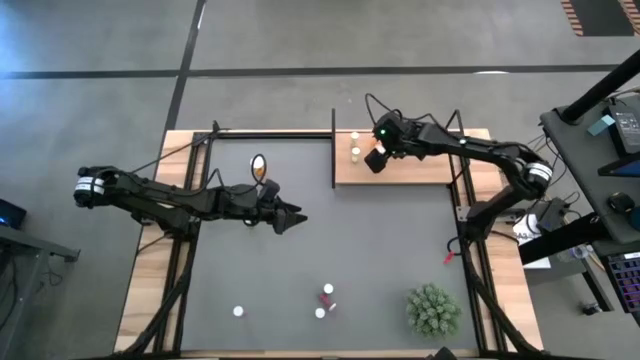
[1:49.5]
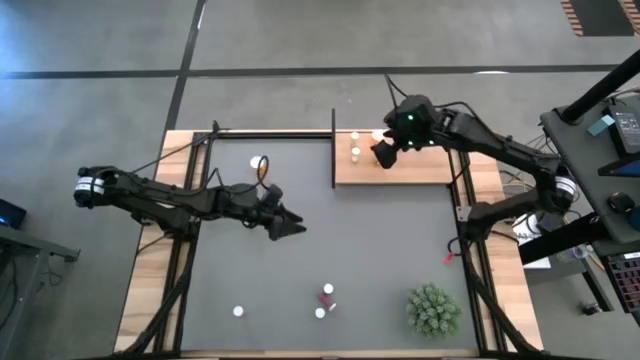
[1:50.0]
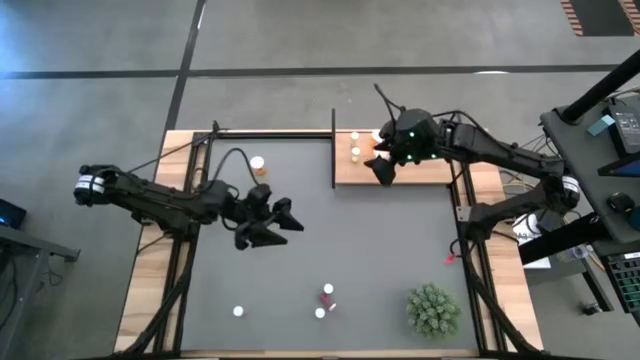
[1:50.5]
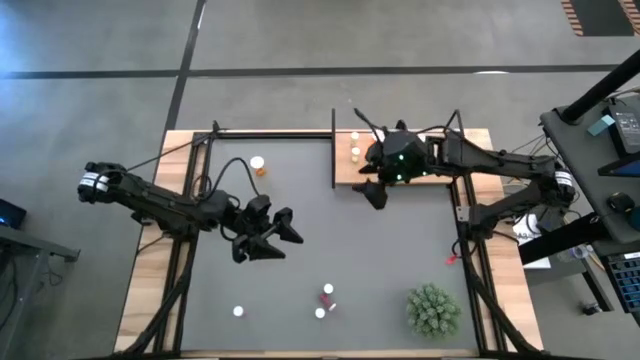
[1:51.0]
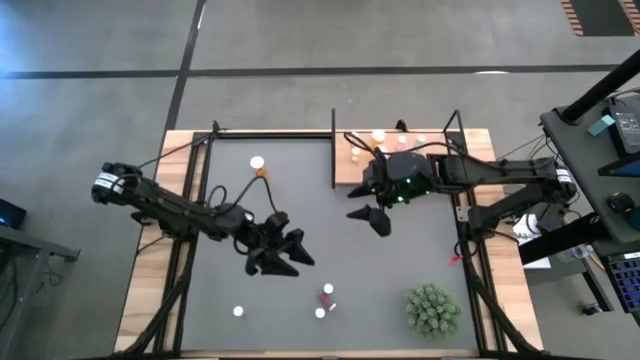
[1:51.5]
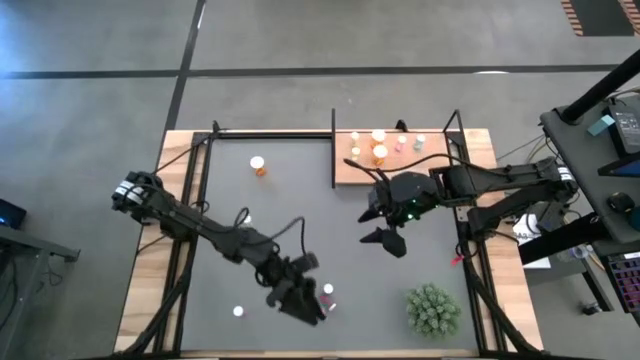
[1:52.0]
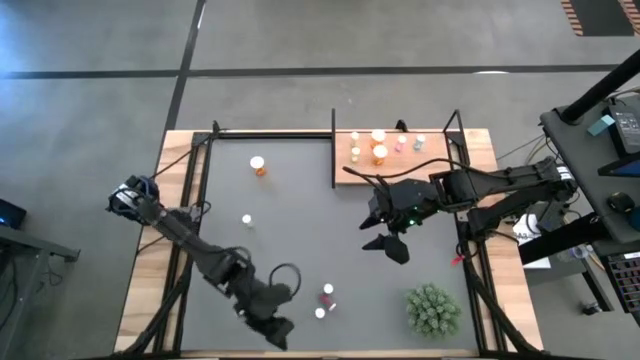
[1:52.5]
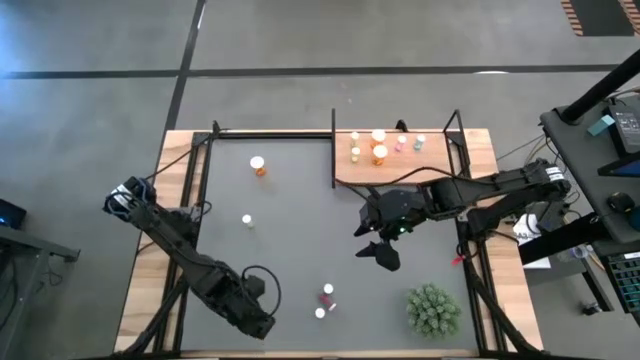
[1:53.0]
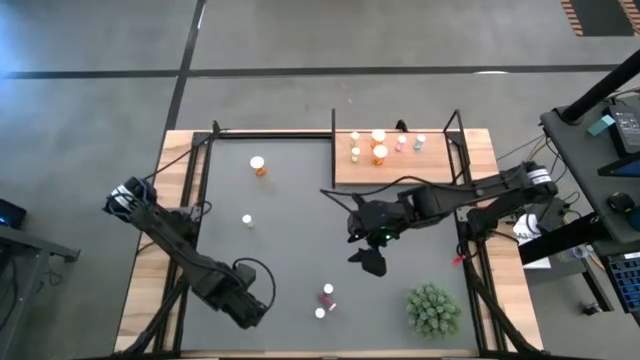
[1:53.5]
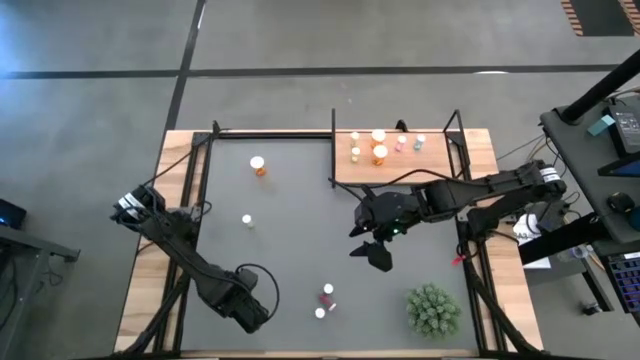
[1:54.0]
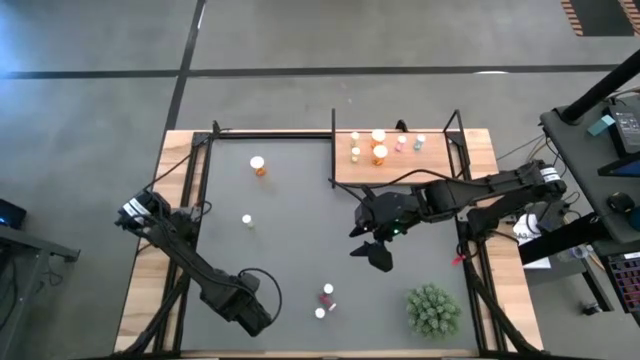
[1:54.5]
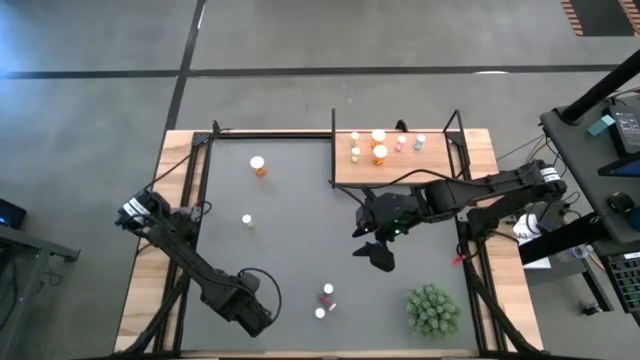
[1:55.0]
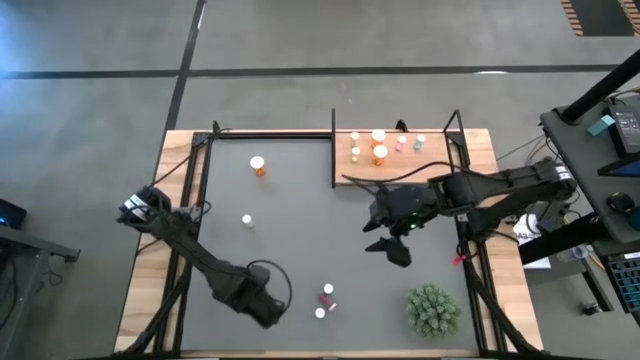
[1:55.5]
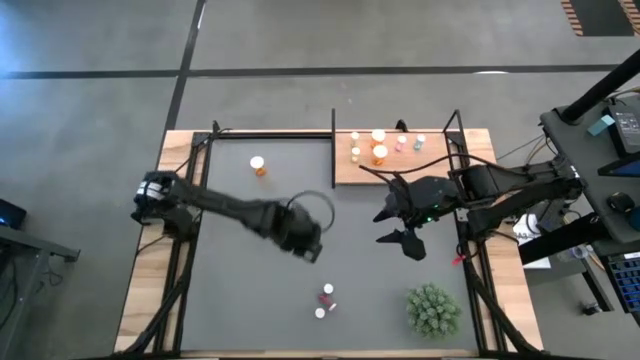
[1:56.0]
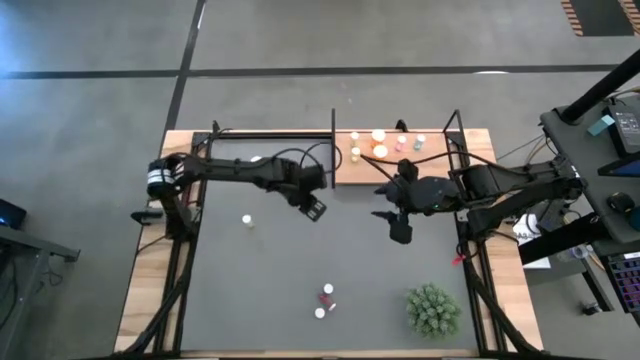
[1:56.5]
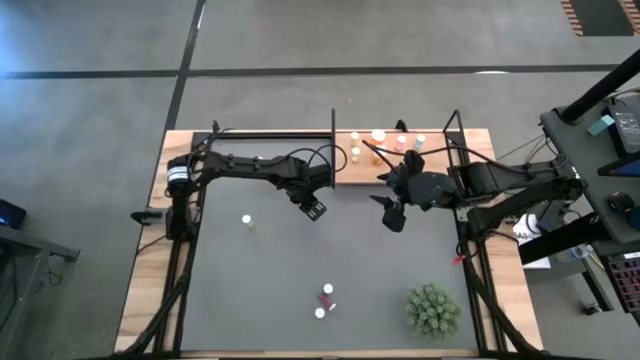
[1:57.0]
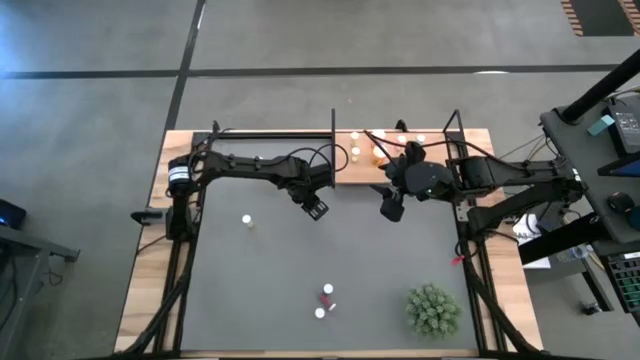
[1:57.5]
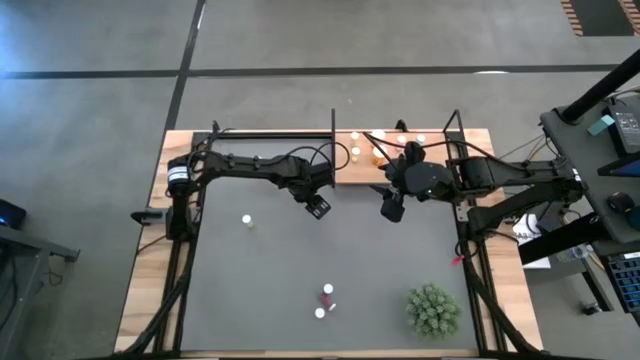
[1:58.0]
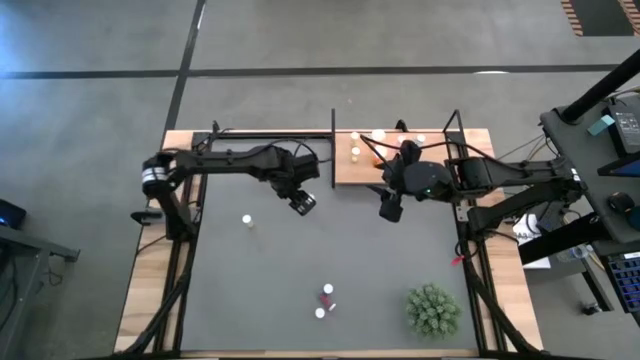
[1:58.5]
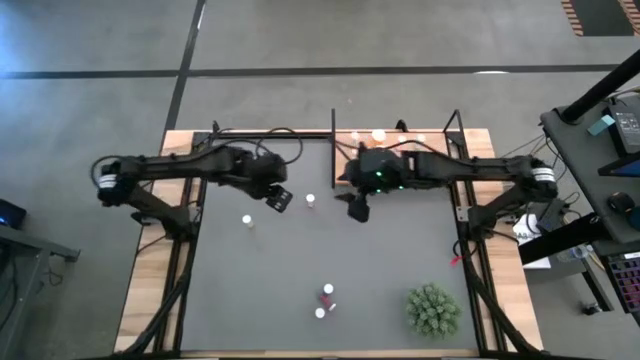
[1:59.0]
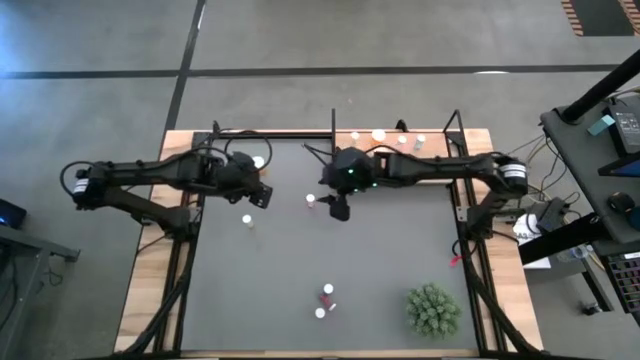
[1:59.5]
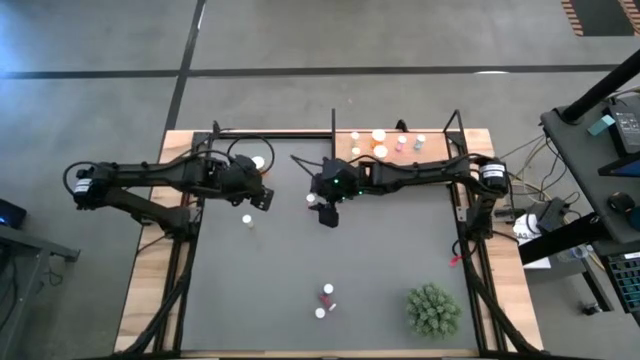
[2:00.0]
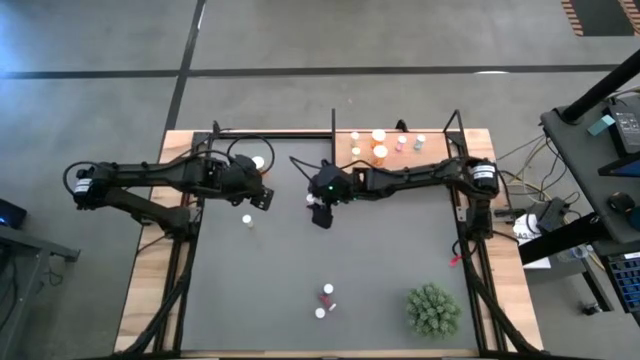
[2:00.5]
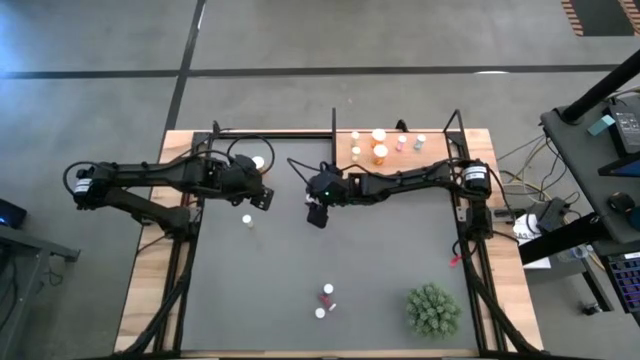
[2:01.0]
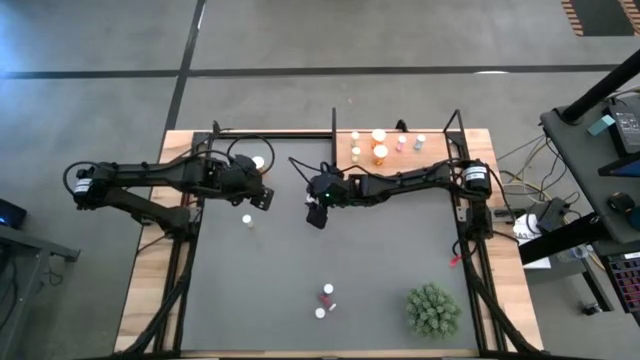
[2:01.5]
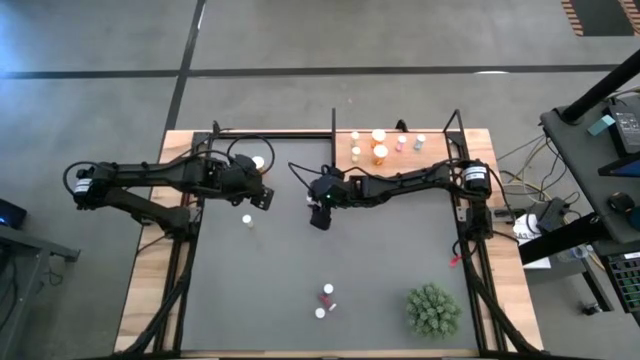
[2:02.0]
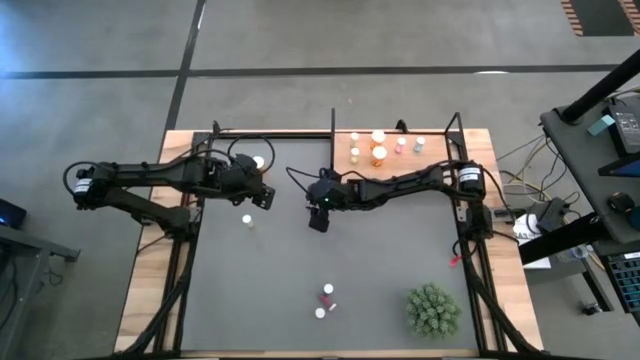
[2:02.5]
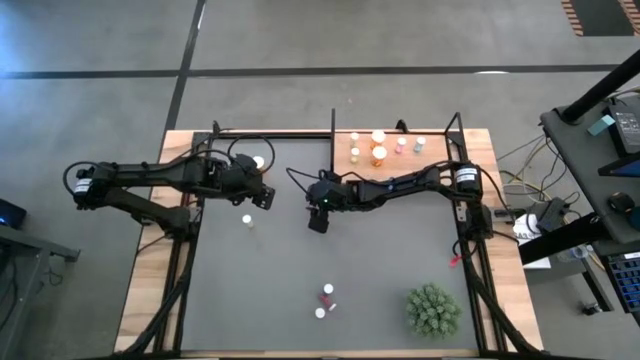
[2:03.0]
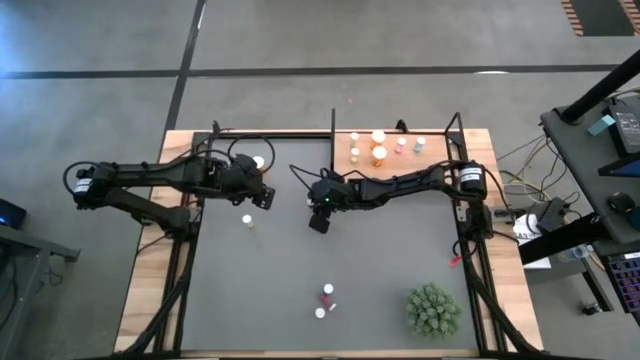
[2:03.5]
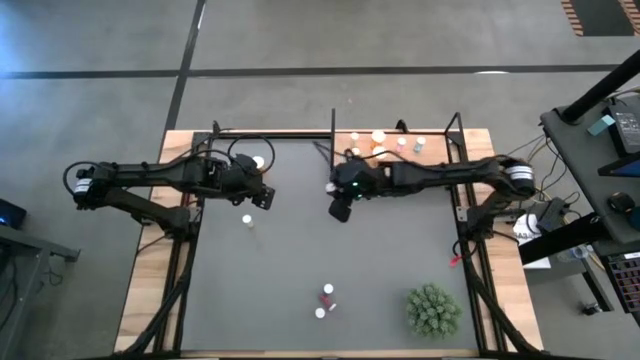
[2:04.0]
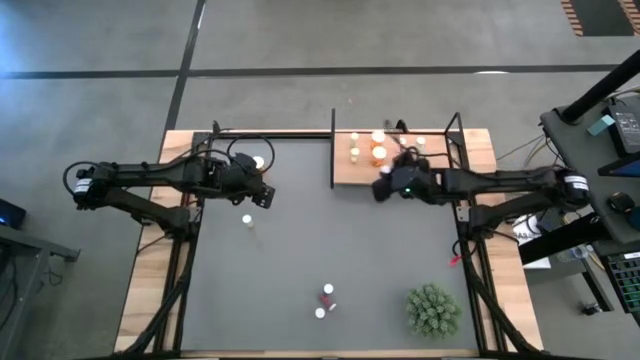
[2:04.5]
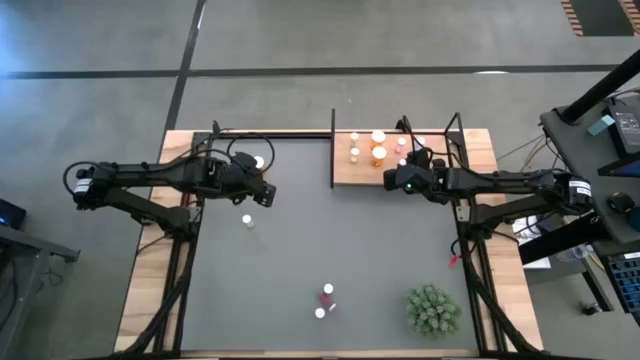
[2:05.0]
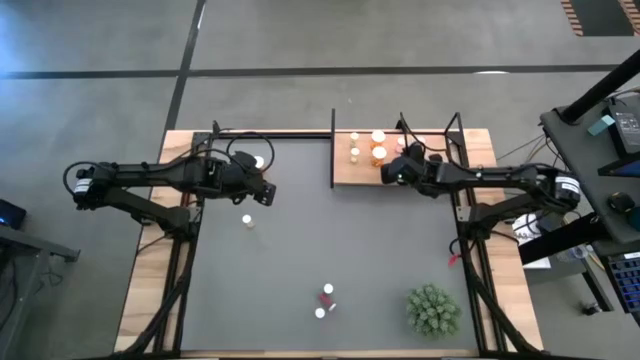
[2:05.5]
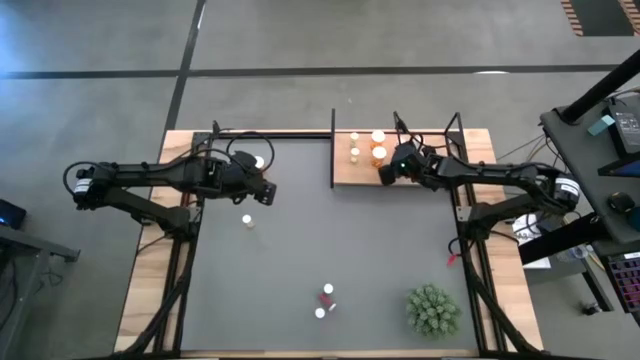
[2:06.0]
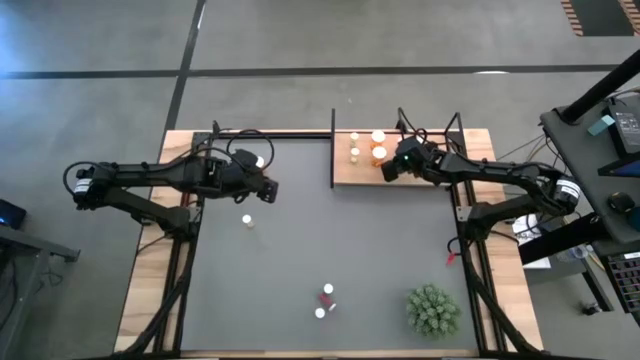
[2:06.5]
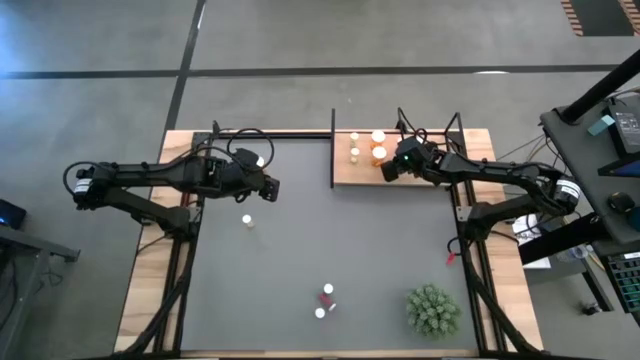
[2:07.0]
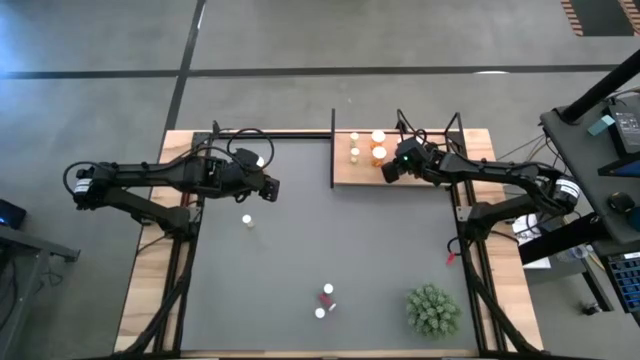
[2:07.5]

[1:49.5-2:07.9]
Task: Pick and place medicine bottles onto shelf by color
Put the left pink medicine bottle on the shelf aligned with the other pink medicine bottle

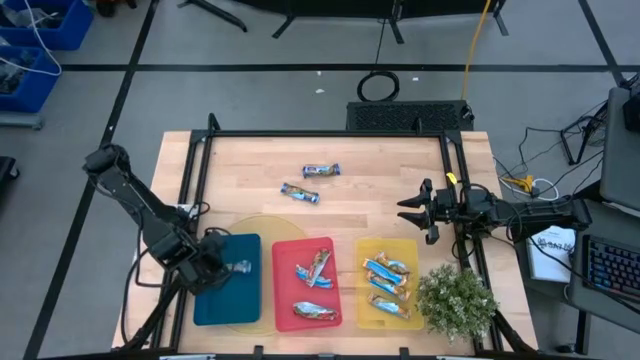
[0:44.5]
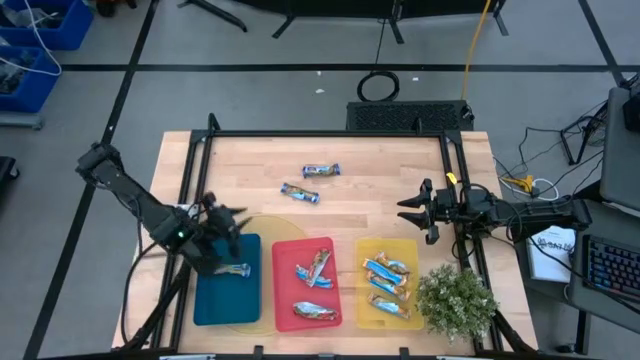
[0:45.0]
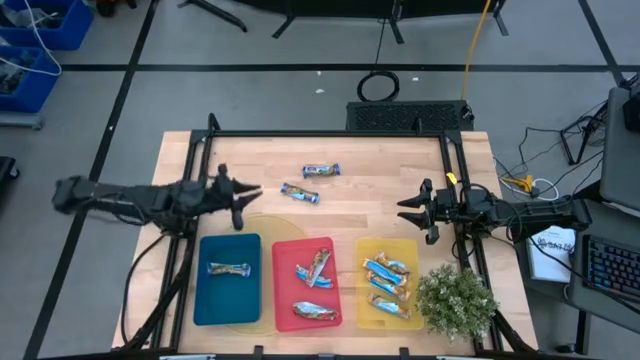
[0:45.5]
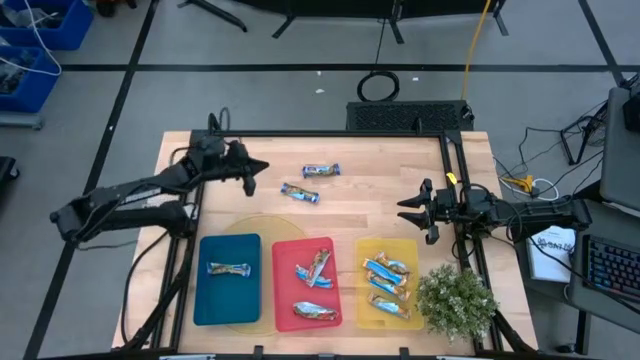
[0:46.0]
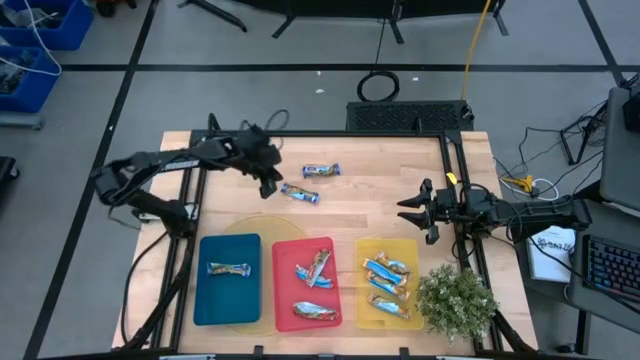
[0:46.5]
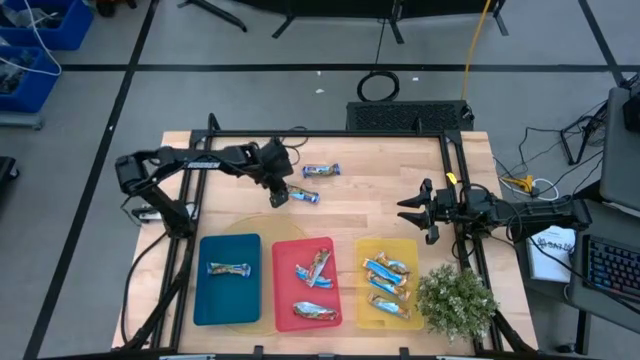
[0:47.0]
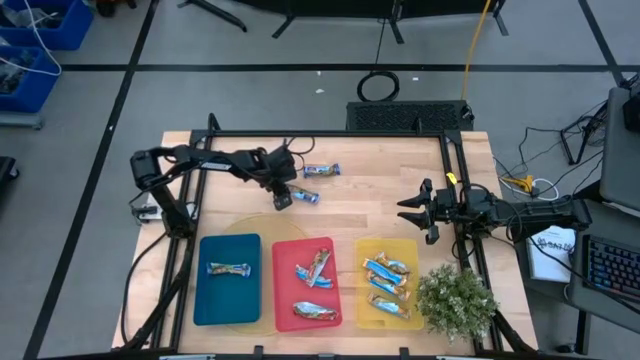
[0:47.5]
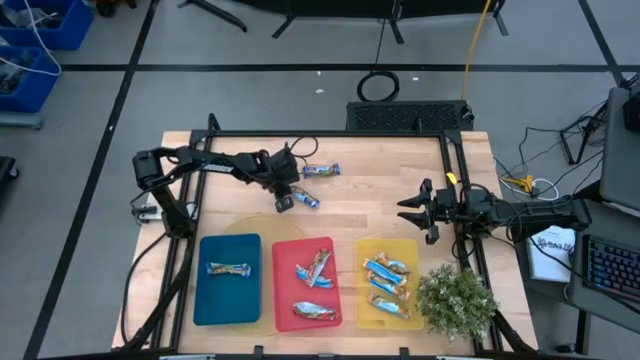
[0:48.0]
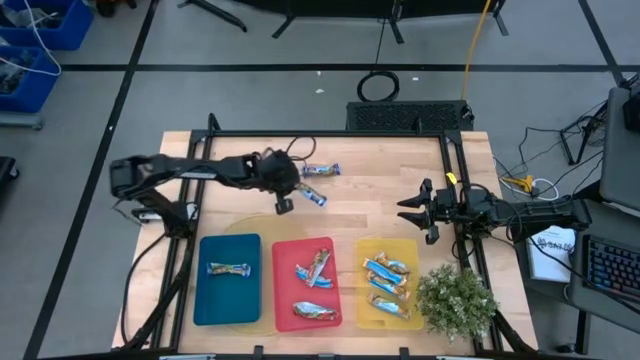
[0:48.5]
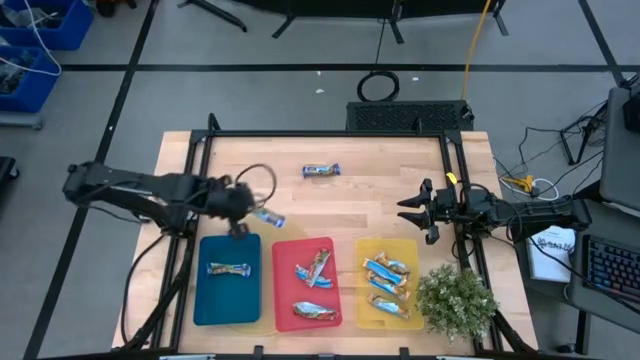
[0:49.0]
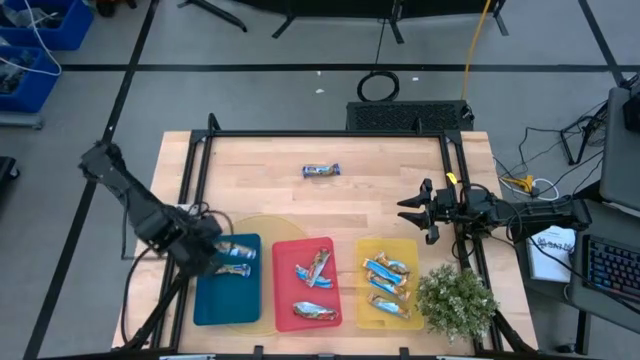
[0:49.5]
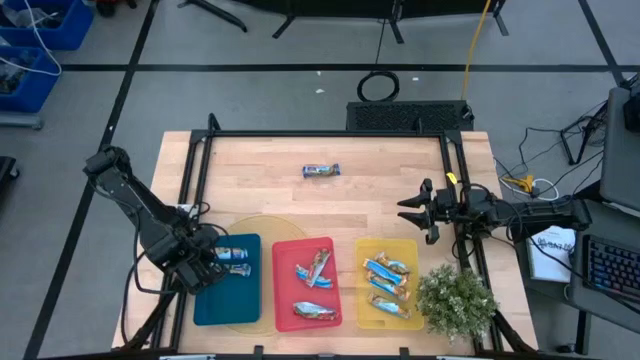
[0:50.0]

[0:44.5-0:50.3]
Task: Pick and place Granola Bars by type
Put the bottom blue granola bar into the blue bin
